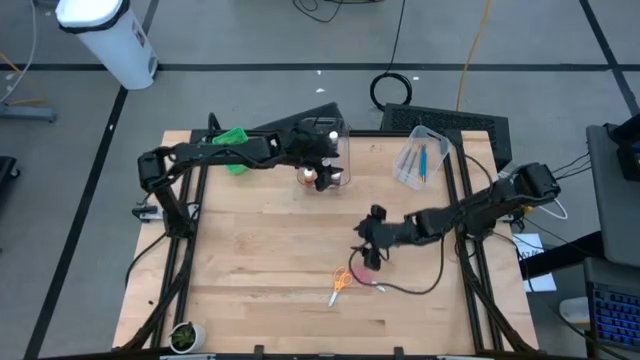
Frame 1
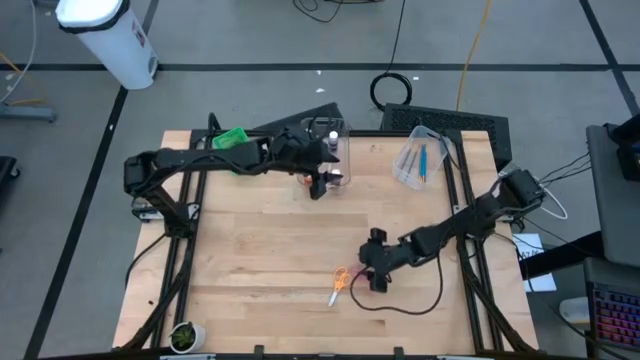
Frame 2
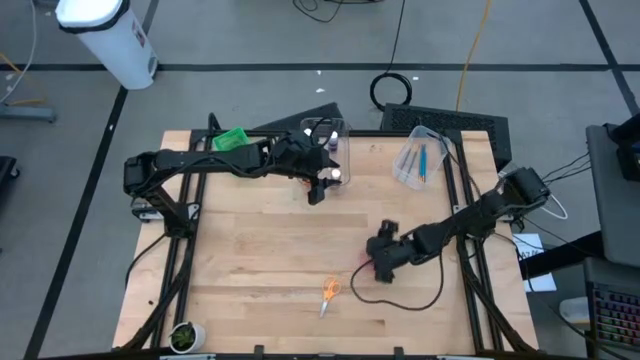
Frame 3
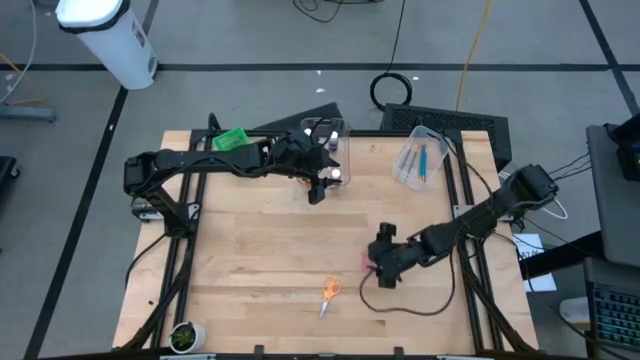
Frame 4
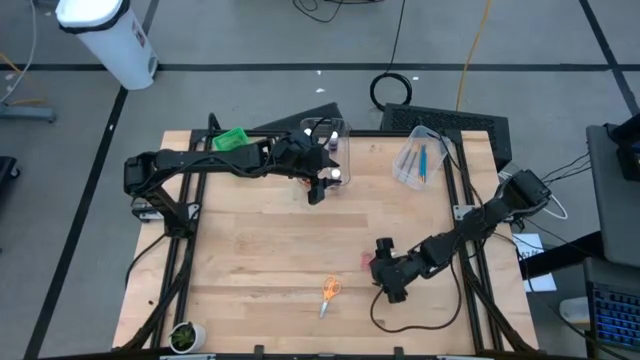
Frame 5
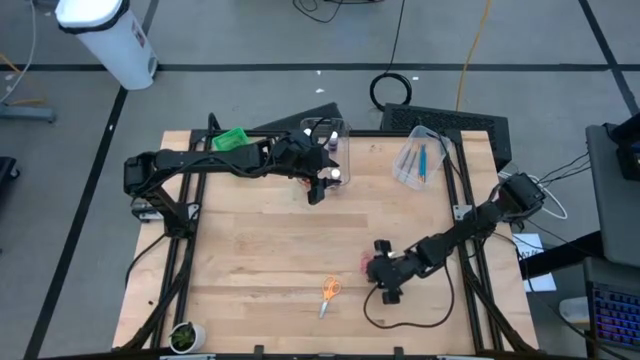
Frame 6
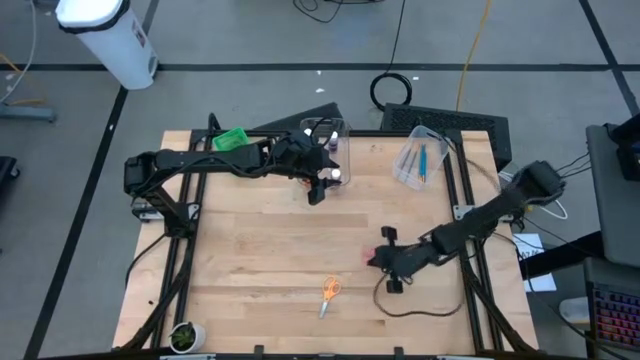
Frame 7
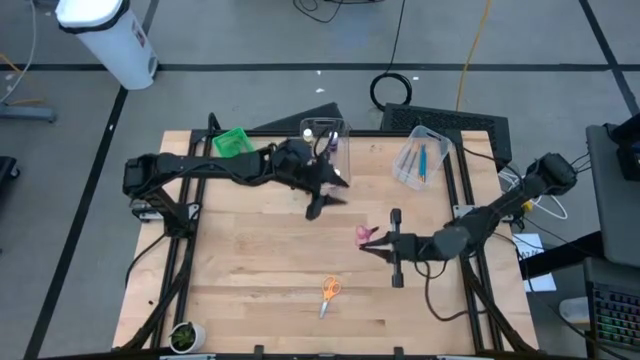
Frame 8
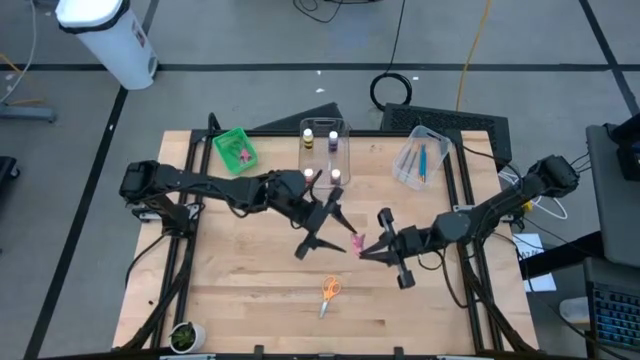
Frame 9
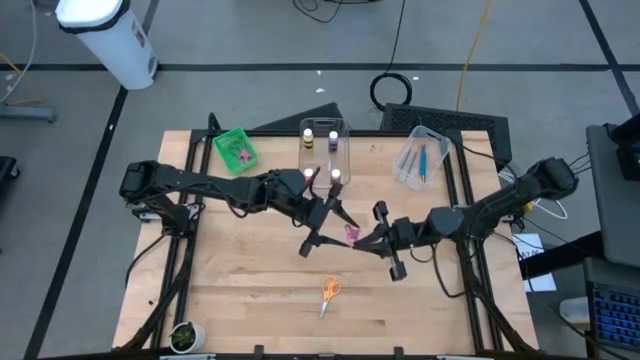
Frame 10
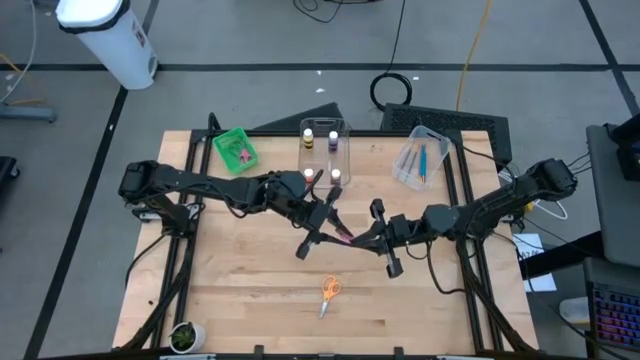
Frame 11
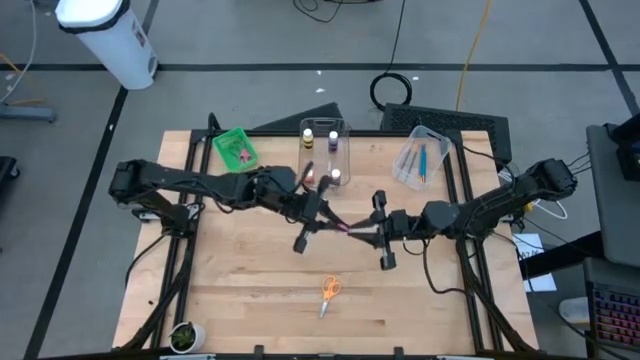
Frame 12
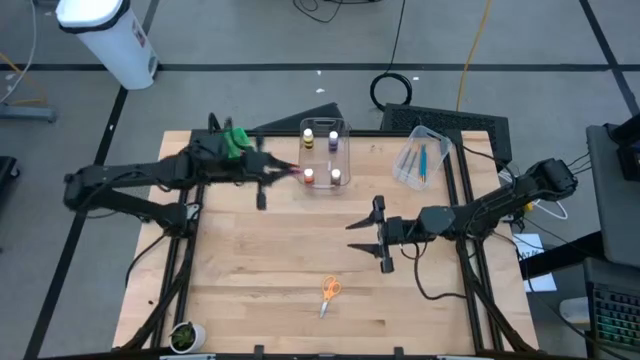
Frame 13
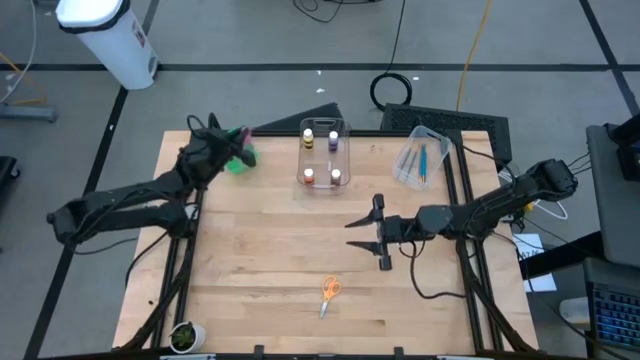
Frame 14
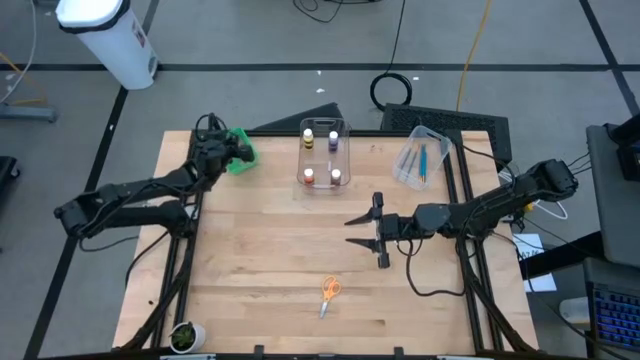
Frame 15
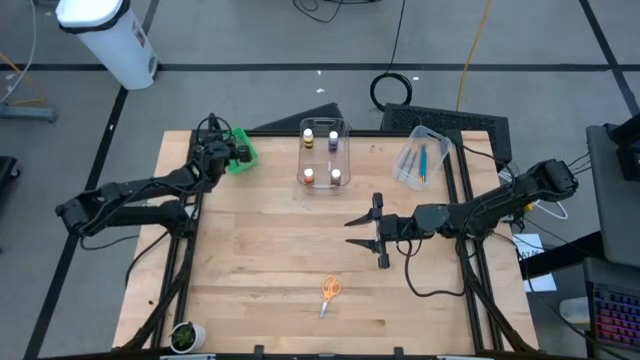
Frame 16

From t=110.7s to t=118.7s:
Task: Pick & Place Paint Supplies
Put the pink scissor into the green bin

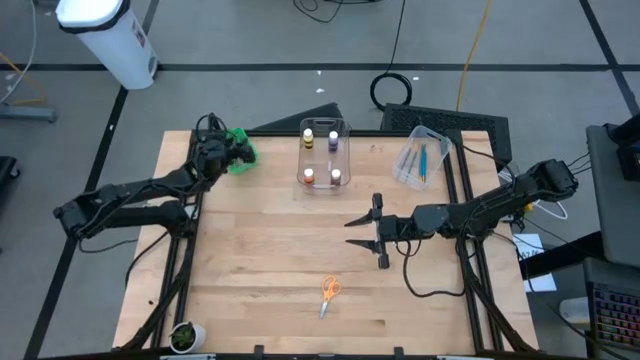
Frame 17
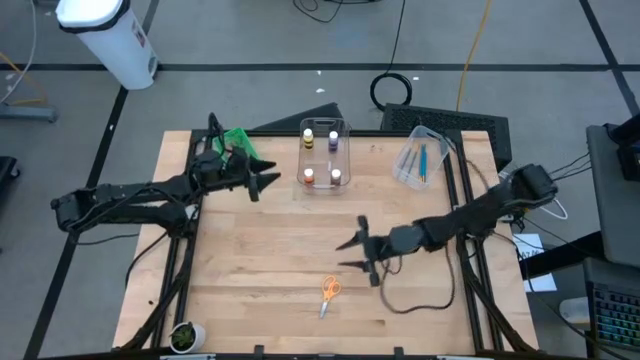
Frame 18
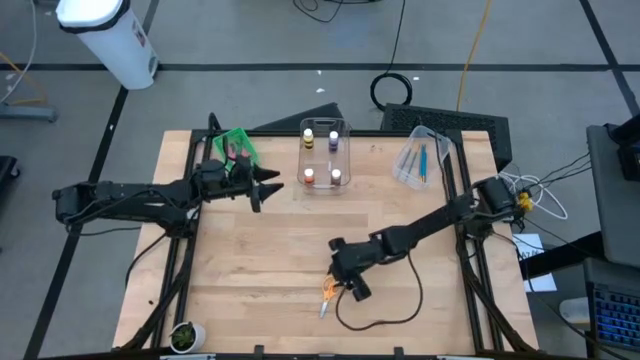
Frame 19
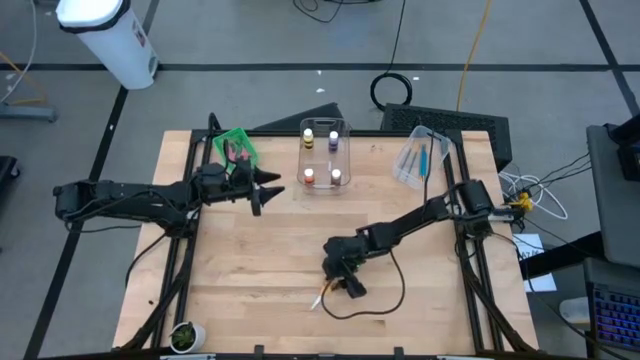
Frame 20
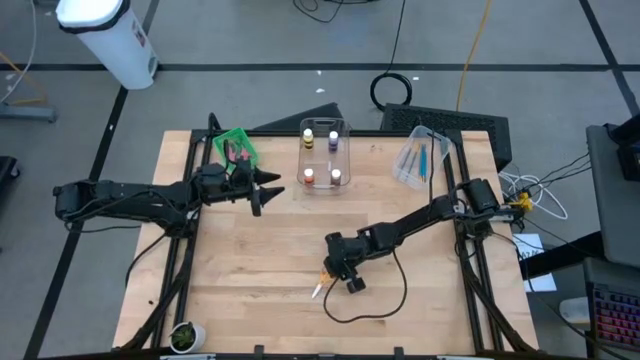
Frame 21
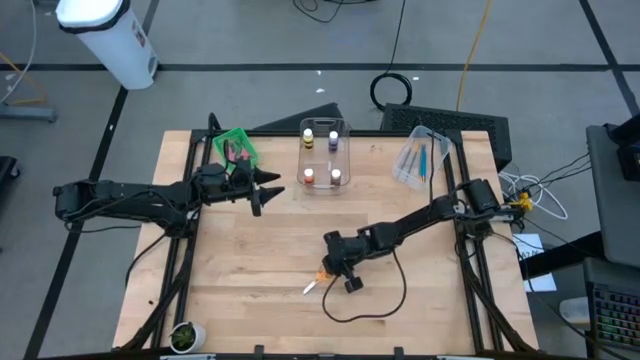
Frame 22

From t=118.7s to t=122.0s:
Put the orange scissor into the green bin

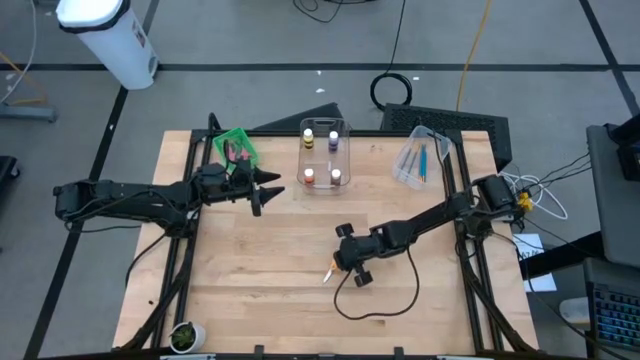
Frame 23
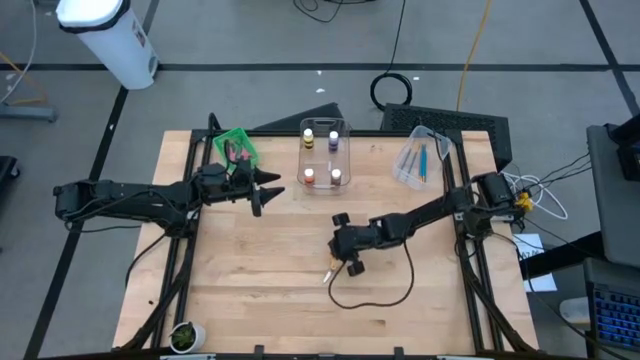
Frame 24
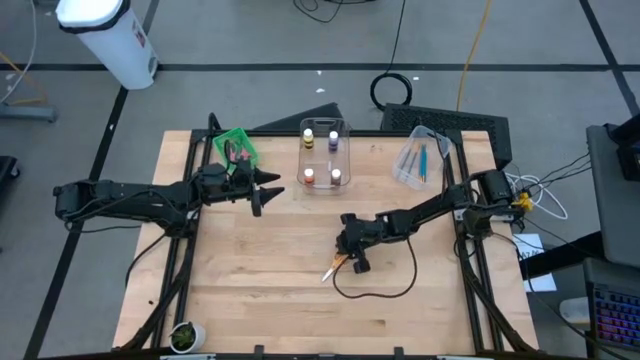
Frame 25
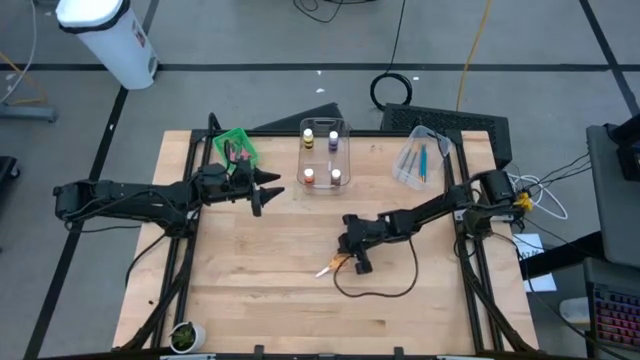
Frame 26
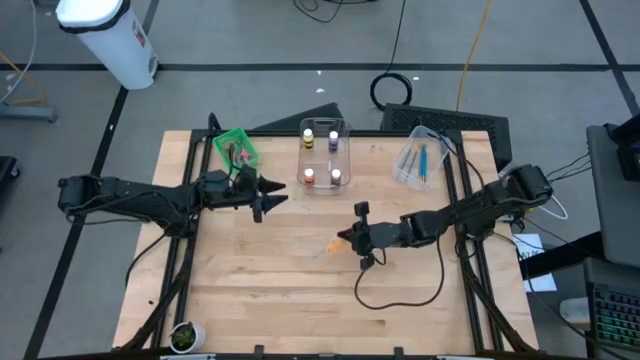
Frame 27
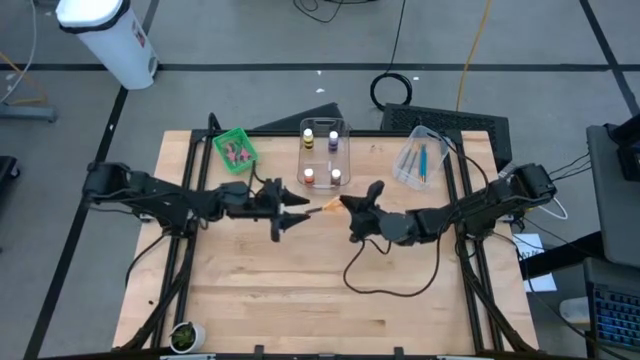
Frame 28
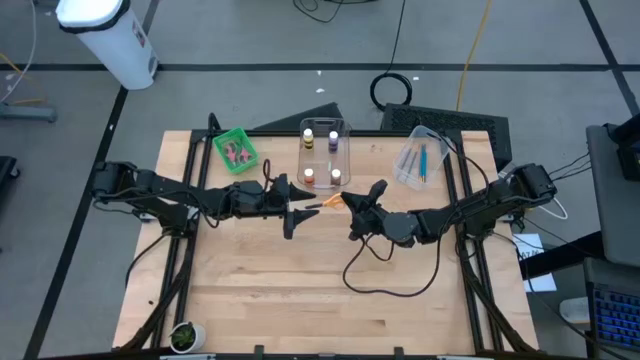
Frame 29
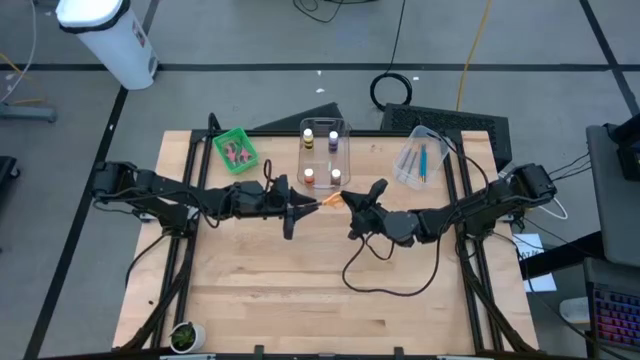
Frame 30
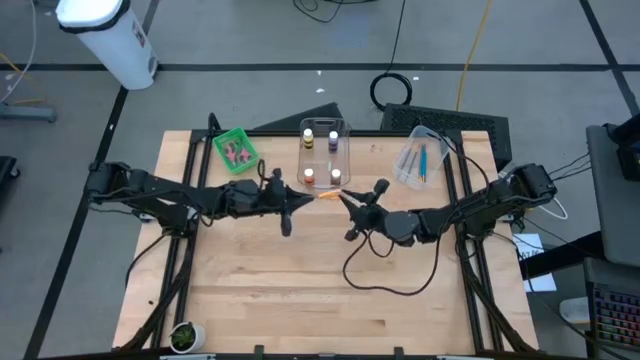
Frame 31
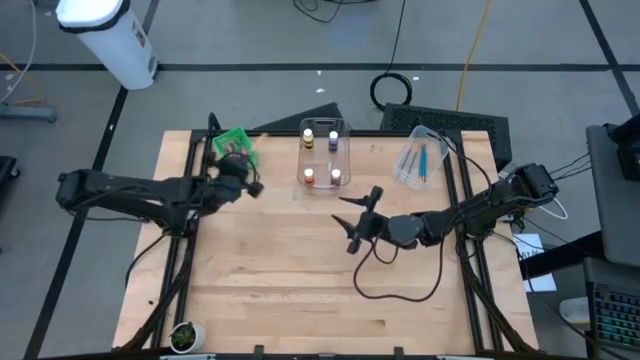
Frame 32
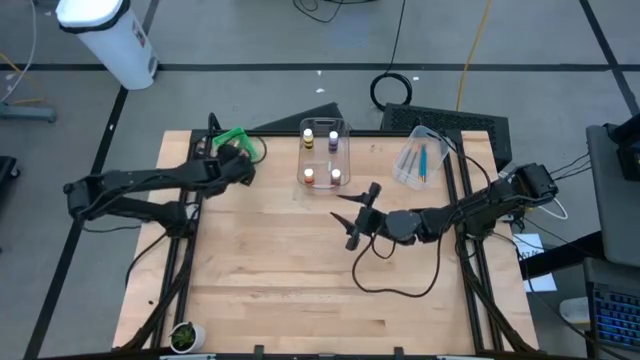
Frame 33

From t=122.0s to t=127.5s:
Put the orange scissor into the green bin

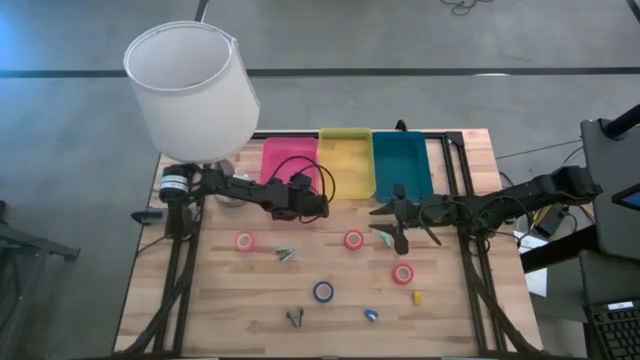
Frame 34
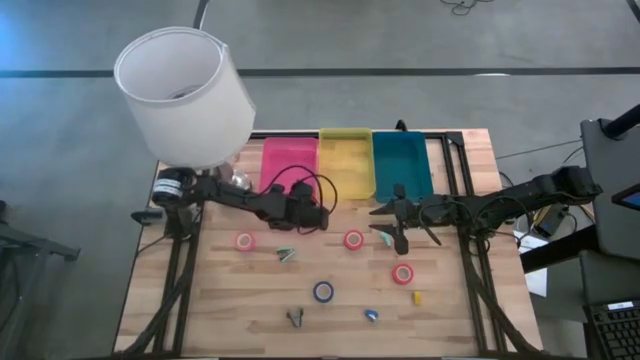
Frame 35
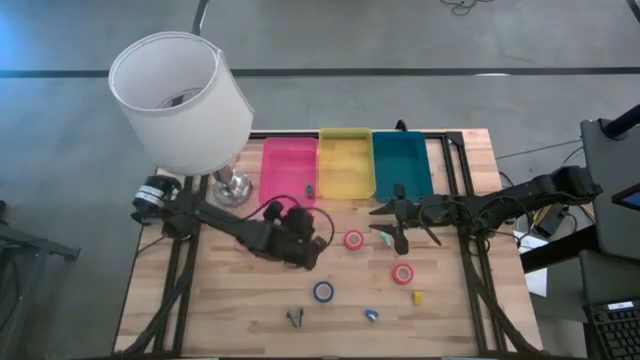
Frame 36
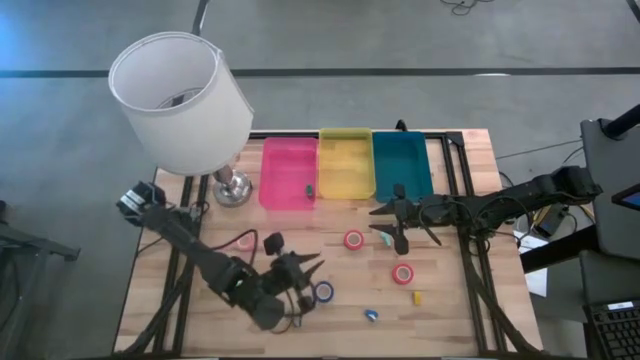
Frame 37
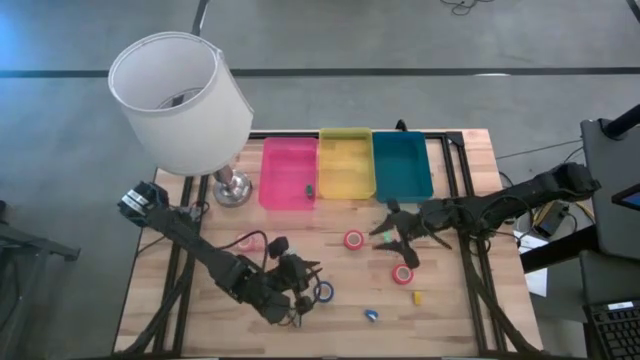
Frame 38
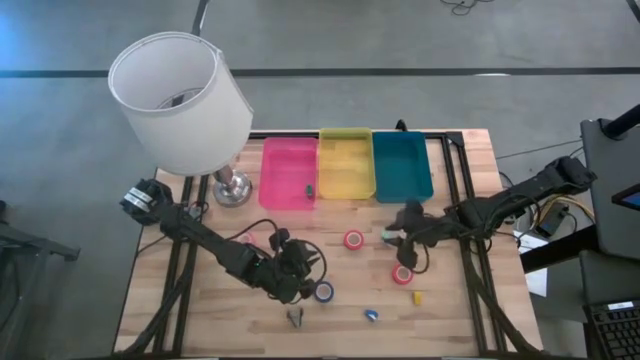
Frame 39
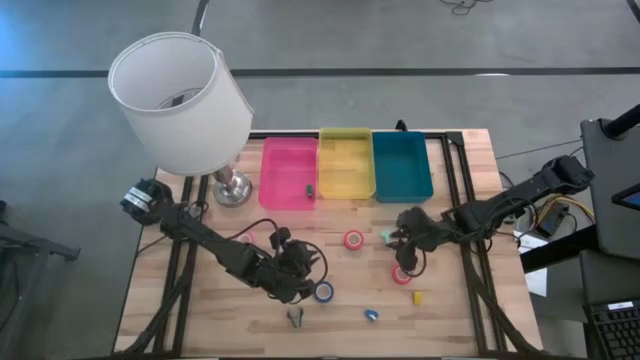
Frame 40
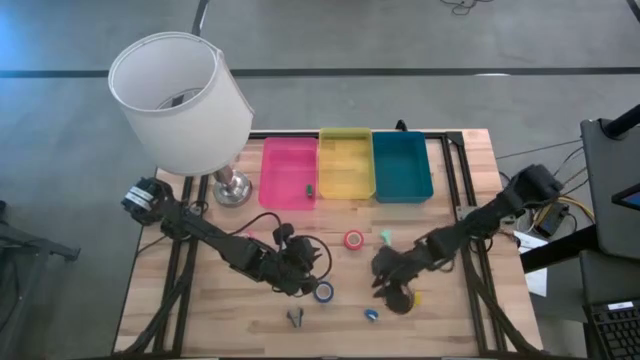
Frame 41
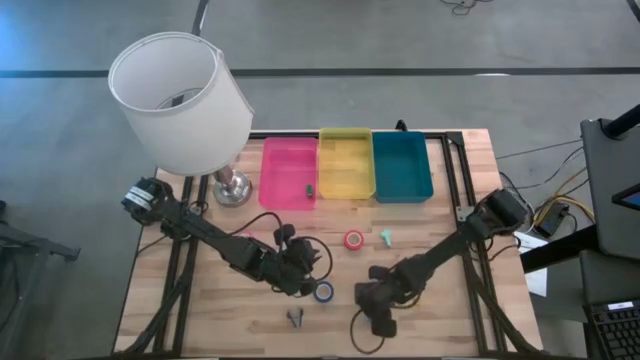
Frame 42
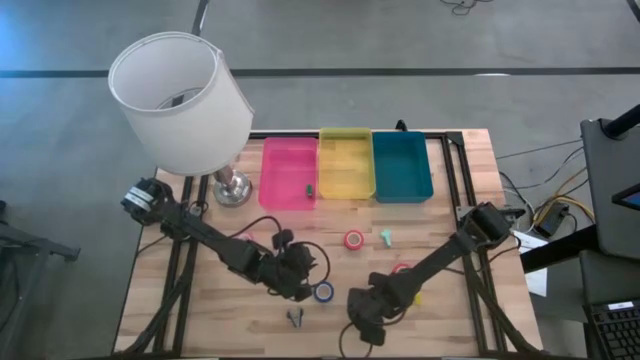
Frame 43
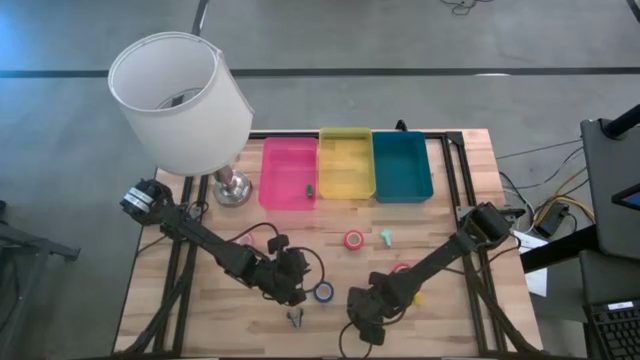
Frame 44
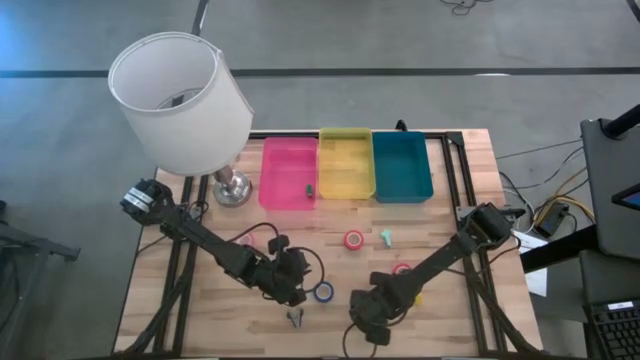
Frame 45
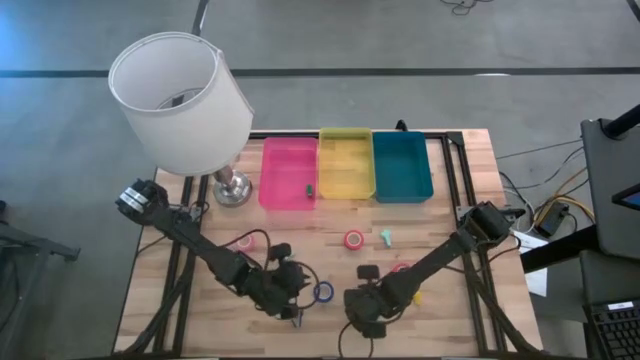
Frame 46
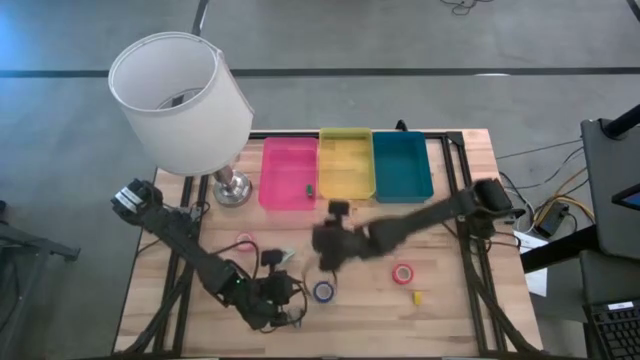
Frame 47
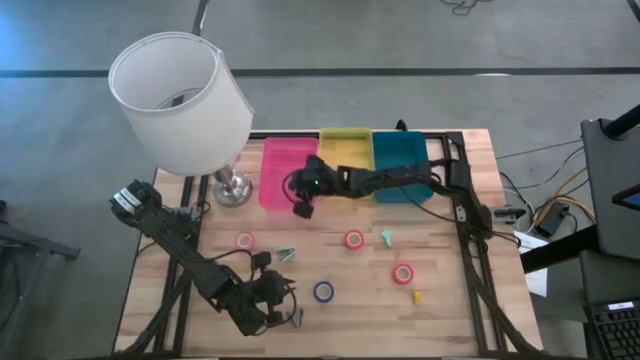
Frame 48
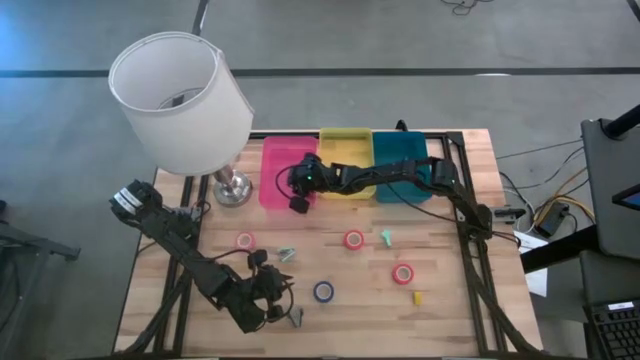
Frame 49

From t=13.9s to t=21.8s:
Task: Pick and place Stapler, Stapler remover, tape
Put the blue stapler into the pink bin
